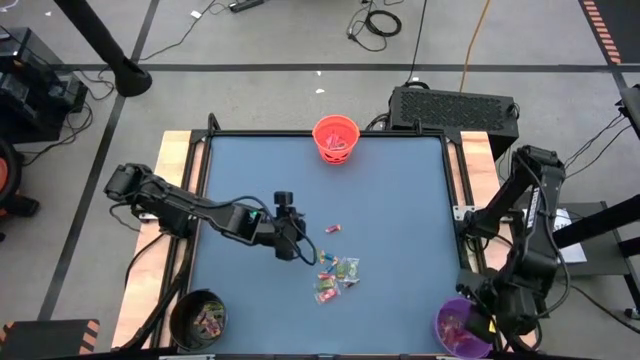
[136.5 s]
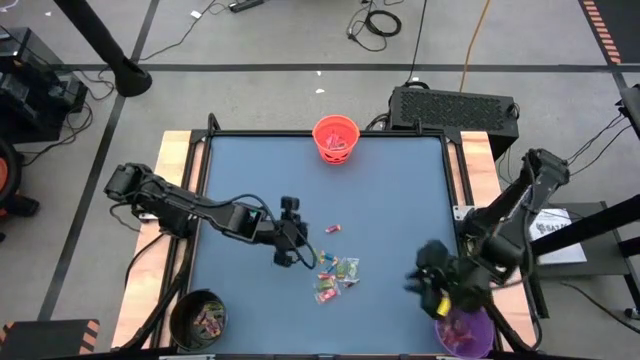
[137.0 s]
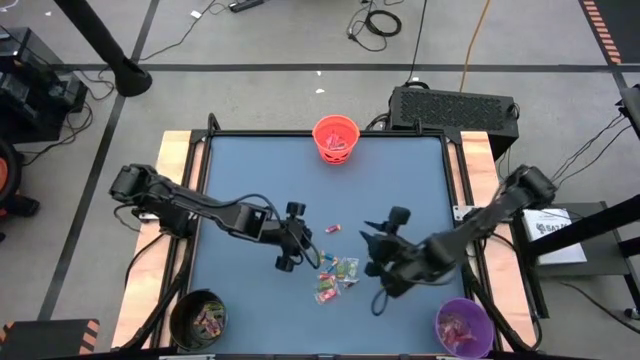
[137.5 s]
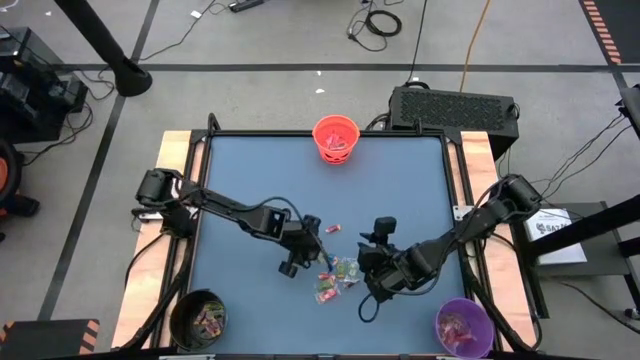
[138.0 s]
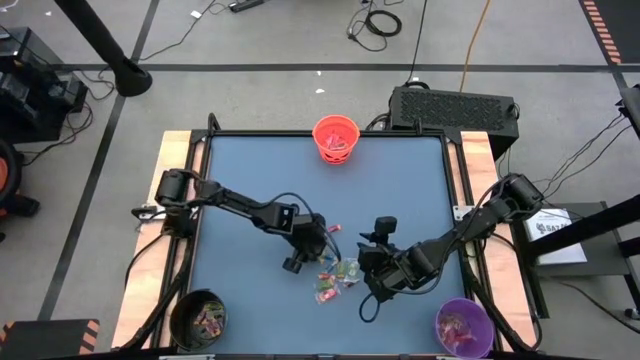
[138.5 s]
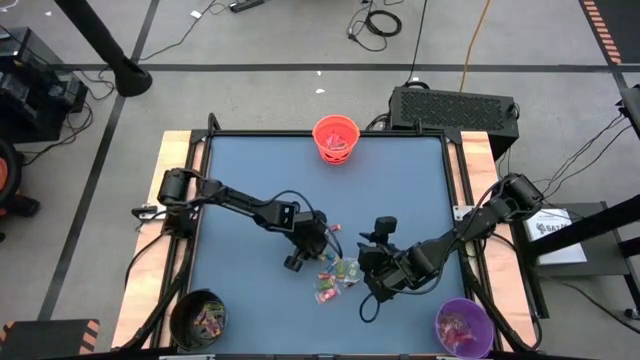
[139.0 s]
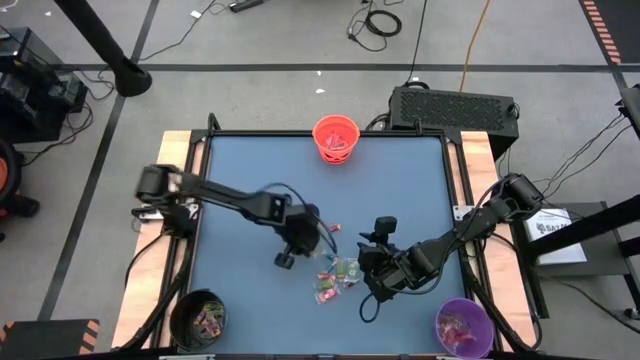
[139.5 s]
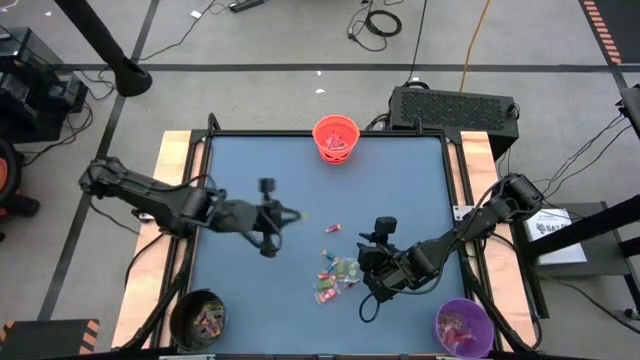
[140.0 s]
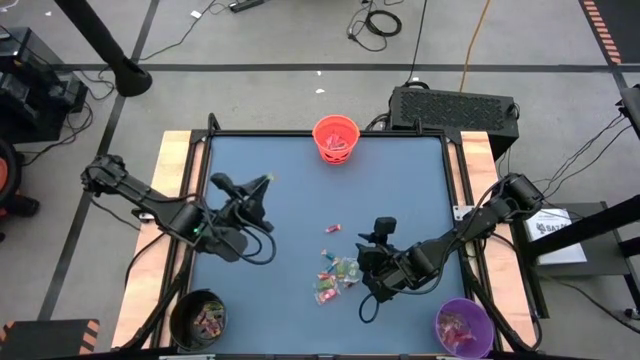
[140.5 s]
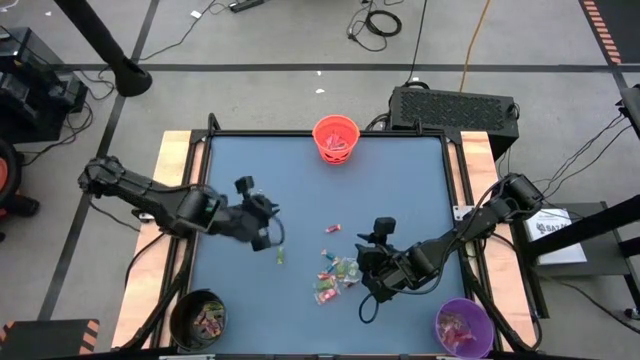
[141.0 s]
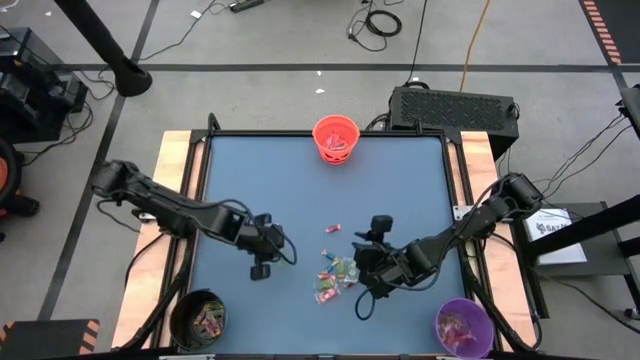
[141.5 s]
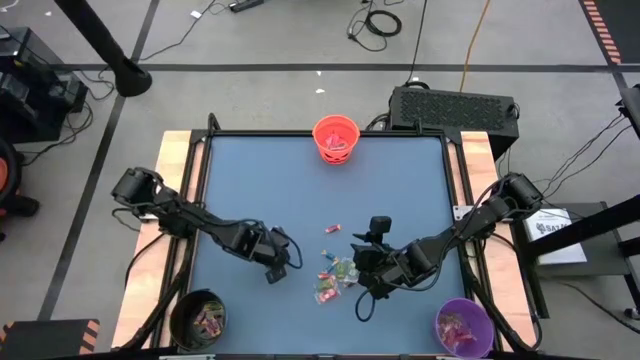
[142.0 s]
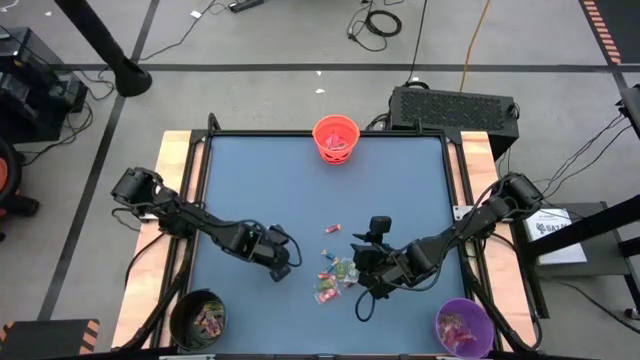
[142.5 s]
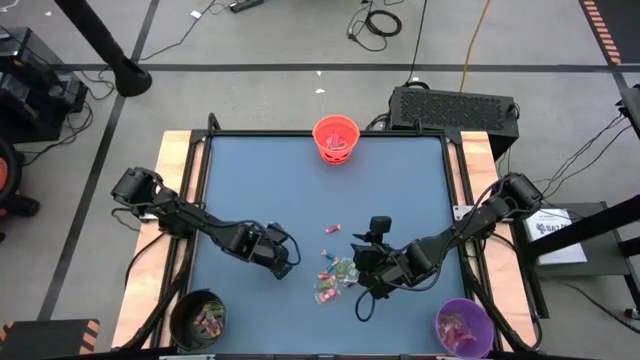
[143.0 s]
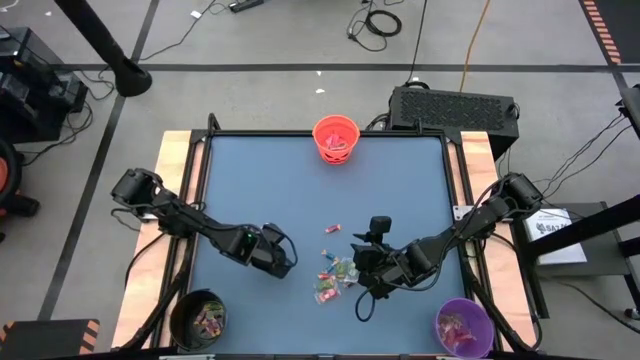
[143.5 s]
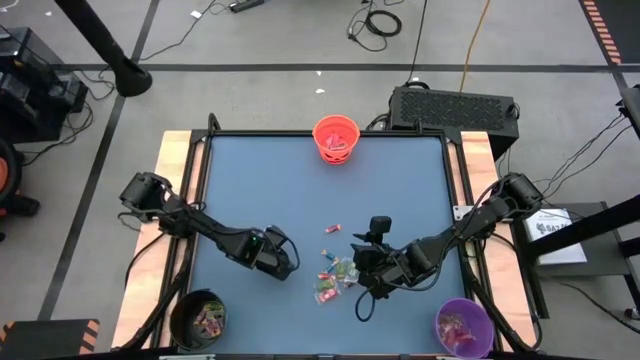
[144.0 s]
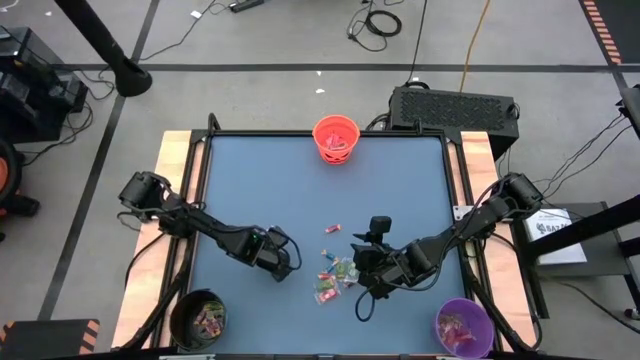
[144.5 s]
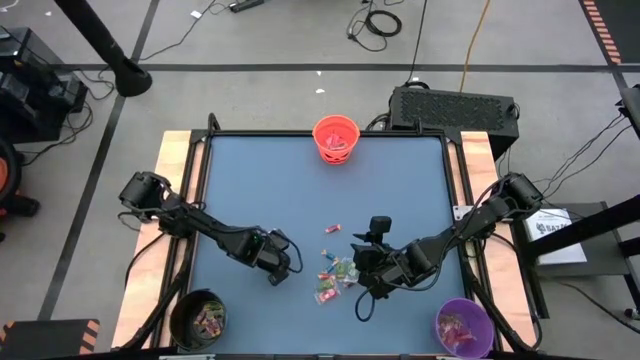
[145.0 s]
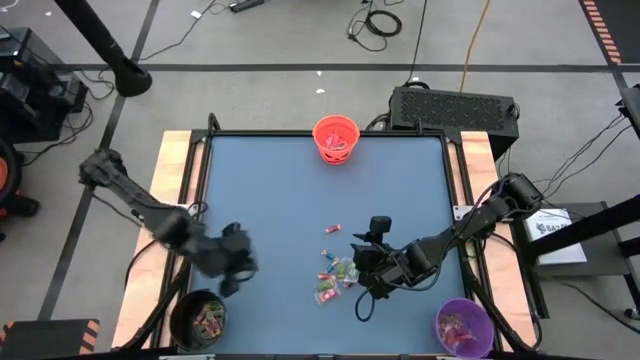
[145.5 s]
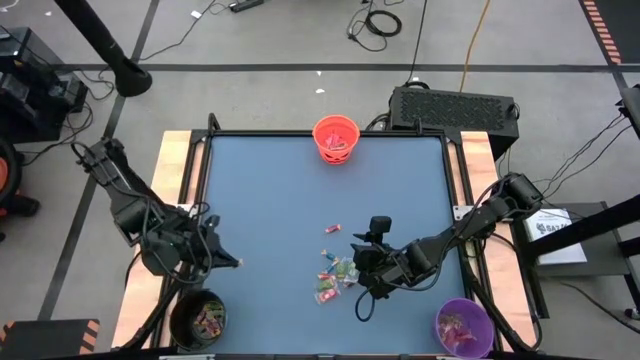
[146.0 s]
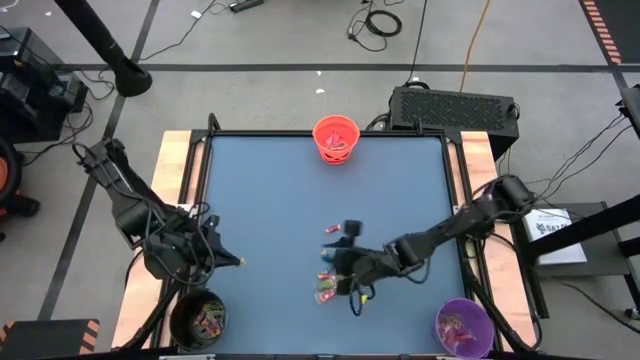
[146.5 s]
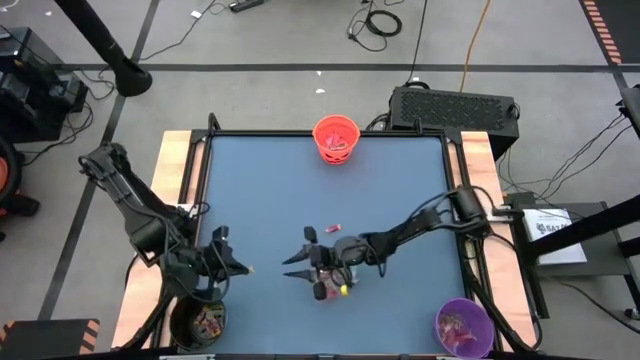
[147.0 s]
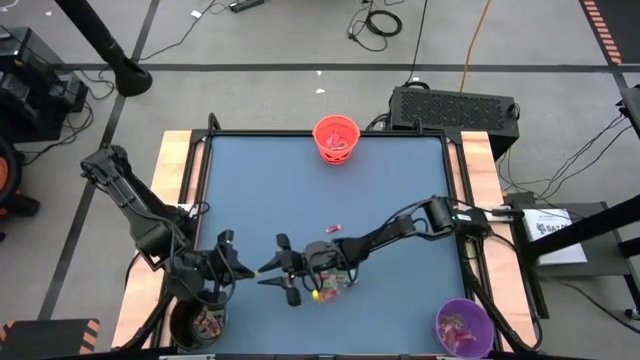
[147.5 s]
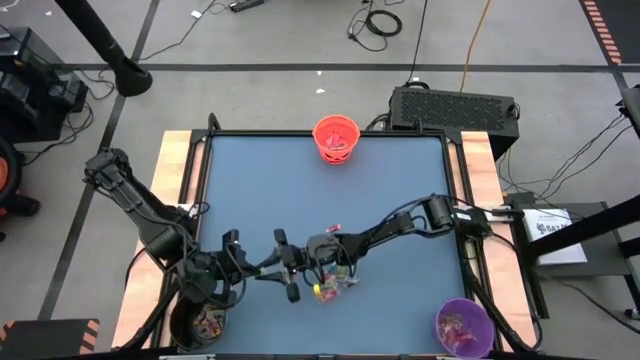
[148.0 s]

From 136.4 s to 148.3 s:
Task: Sort candy by brand, put in halloween buckets
Put the green candy into the black bucket

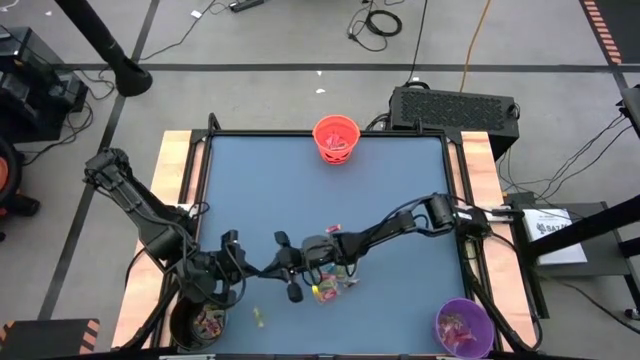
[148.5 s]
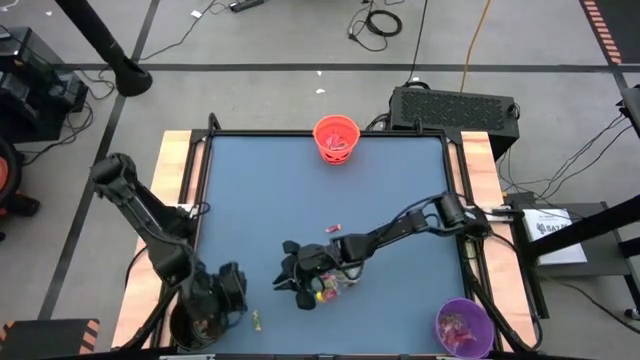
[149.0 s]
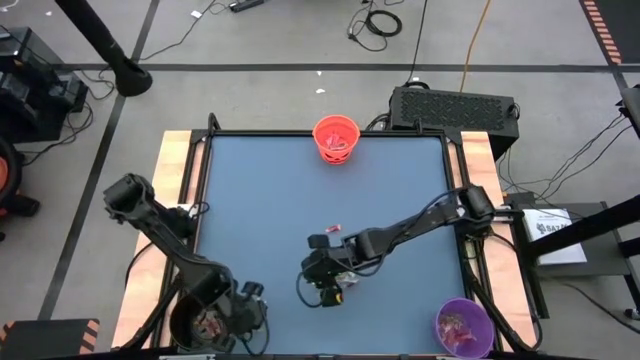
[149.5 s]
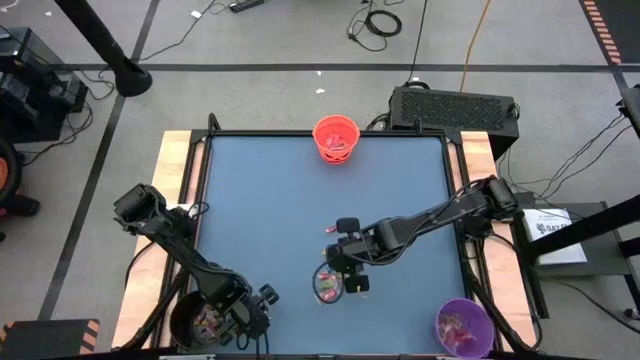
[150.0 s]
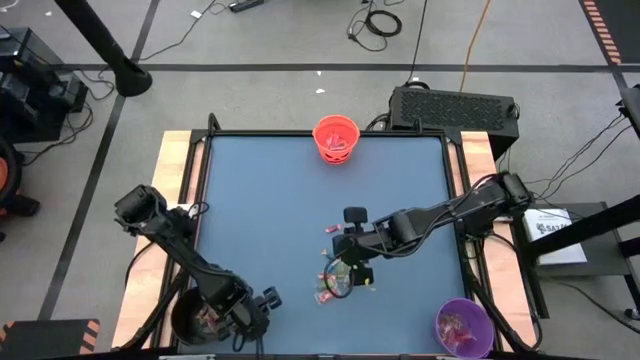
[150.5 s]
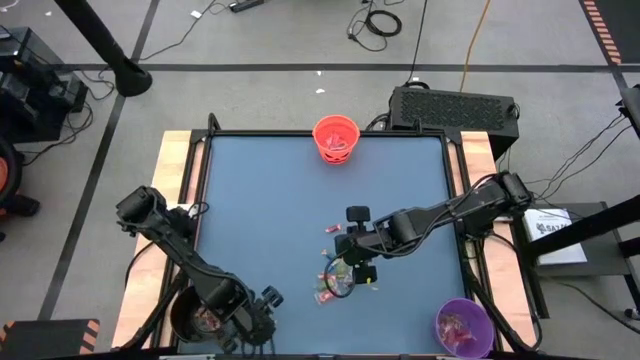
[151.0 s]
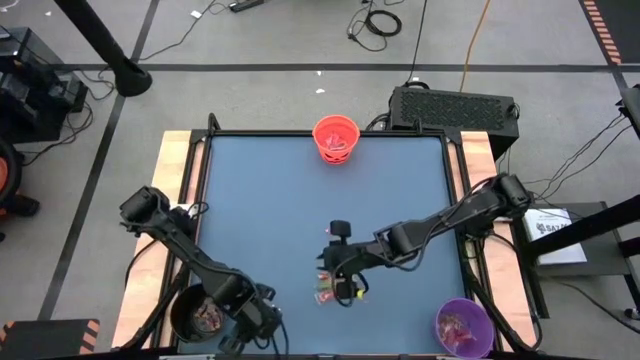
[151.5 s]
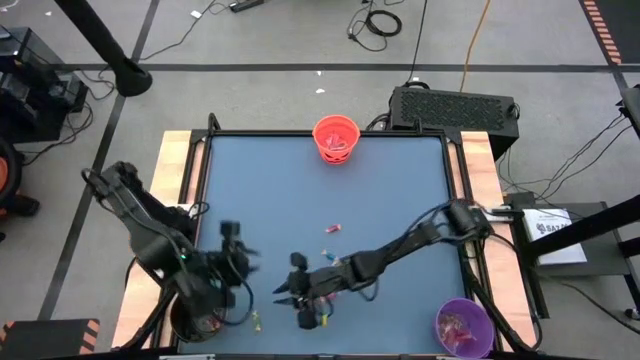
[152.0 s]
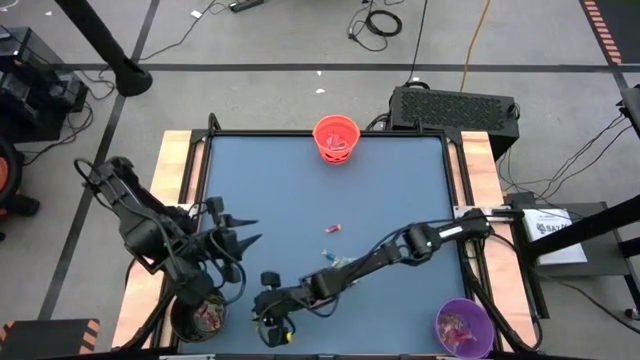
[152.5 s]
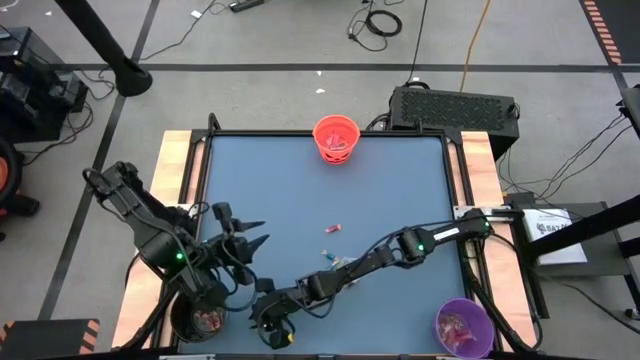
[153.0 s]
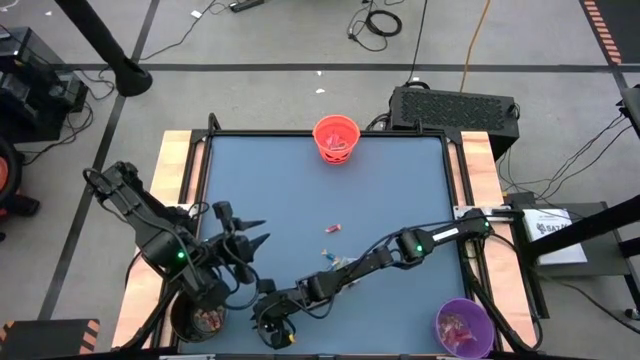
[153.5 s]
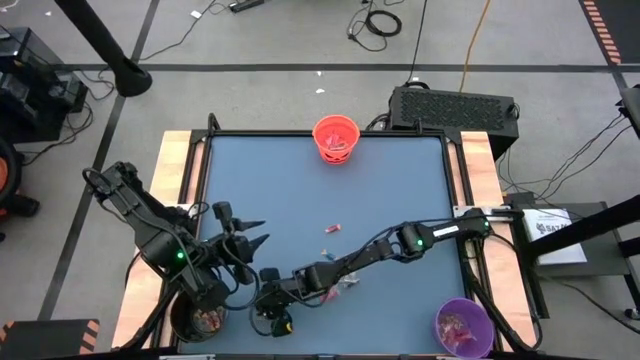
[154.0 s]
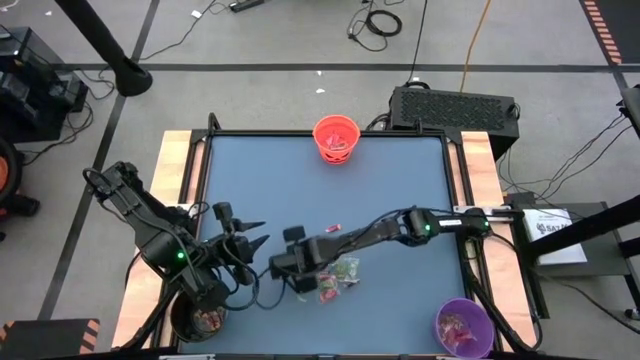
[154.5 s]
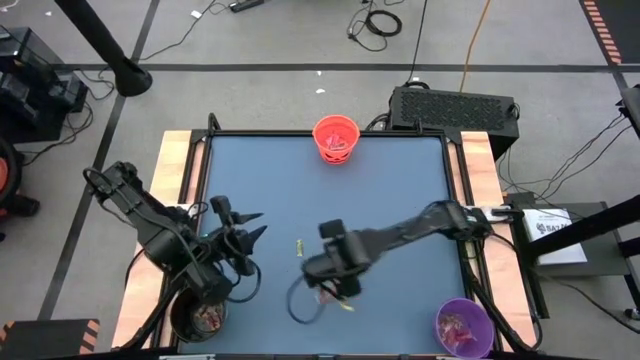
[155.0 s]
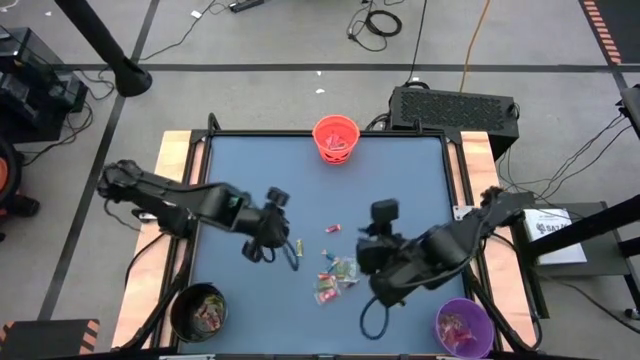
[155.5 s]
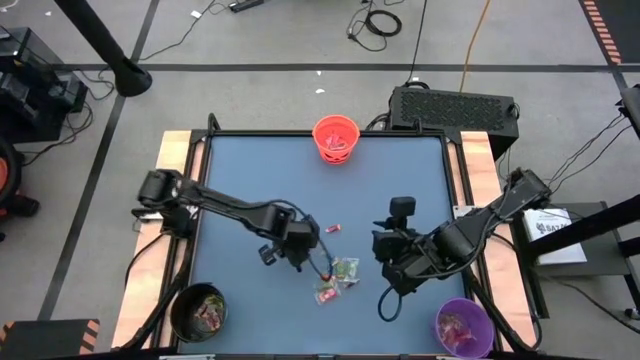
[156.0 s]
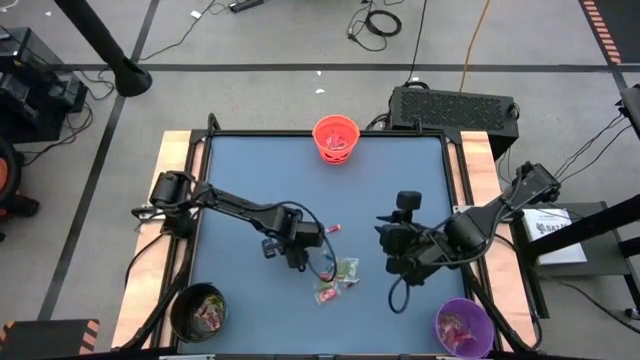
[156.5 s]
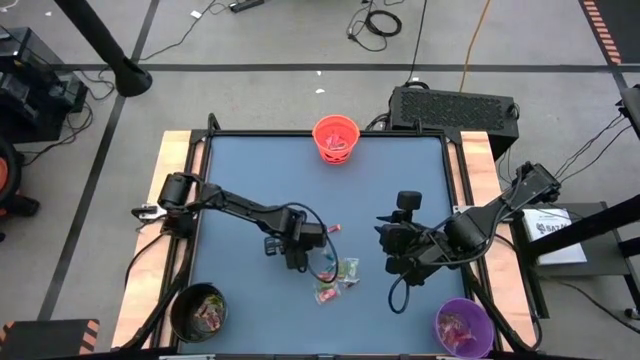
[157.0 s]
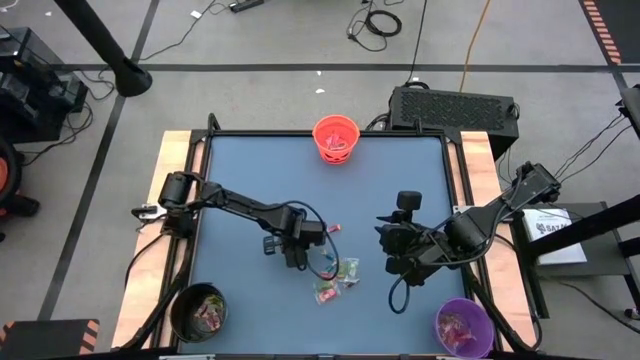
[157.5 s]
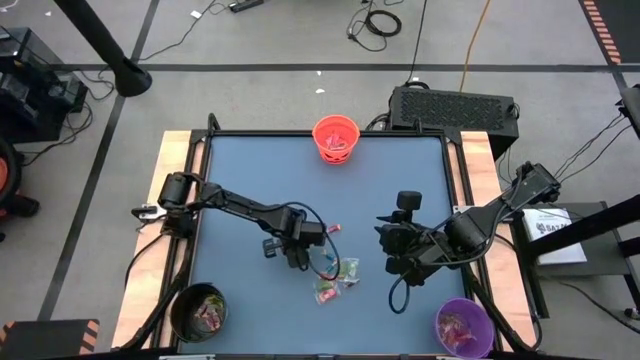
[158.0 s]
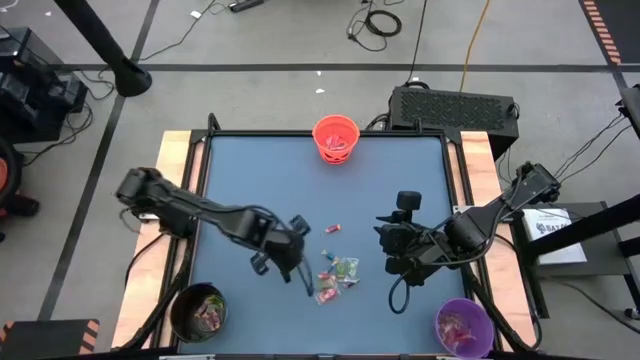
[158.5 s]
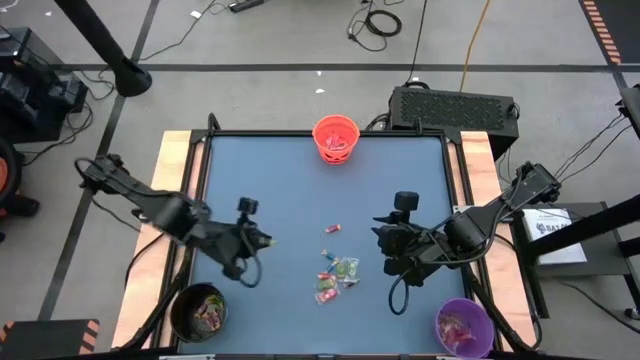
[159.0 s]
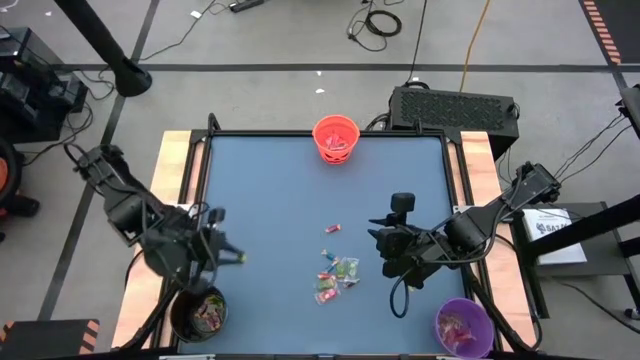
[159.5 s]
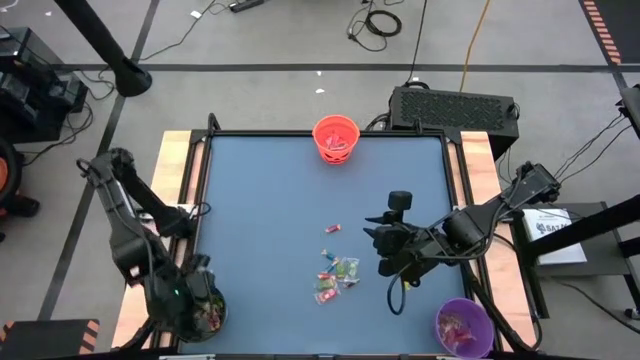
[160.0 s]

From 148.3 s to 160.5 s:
Put the green candy into the black bucket
